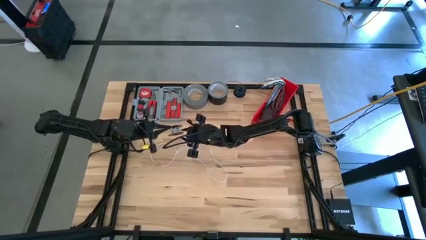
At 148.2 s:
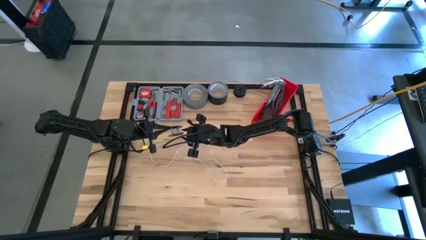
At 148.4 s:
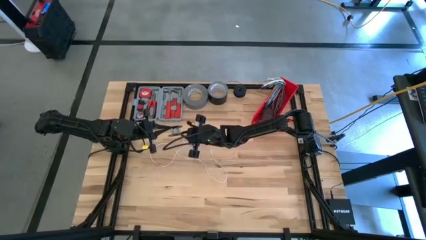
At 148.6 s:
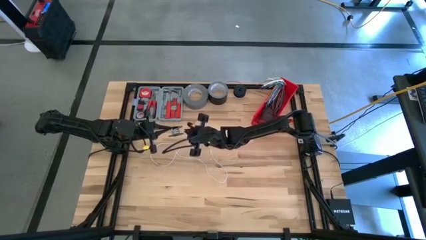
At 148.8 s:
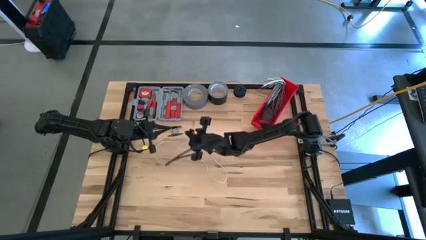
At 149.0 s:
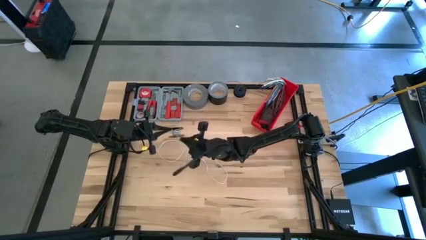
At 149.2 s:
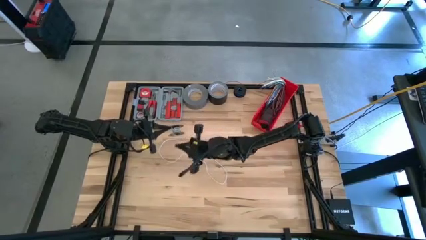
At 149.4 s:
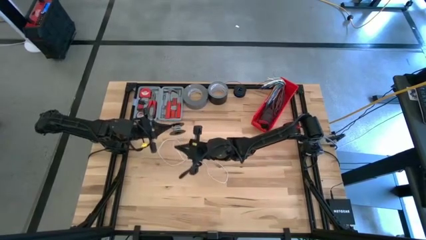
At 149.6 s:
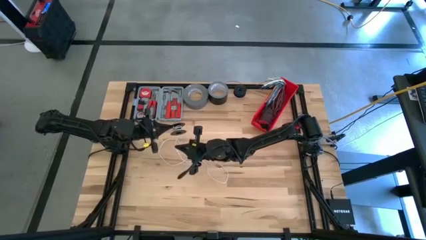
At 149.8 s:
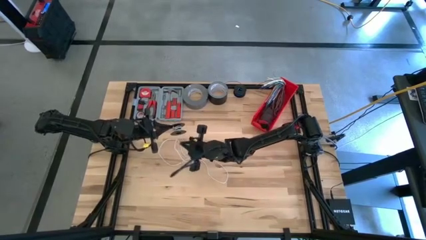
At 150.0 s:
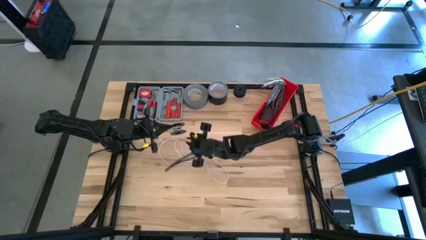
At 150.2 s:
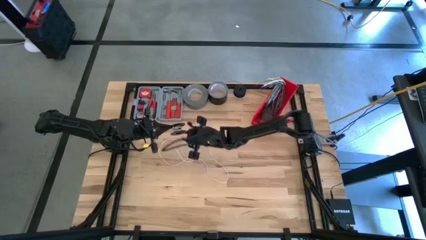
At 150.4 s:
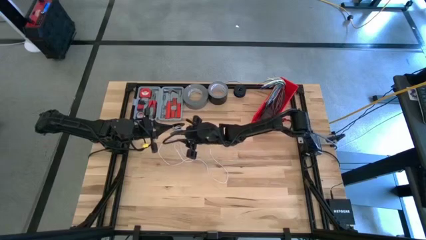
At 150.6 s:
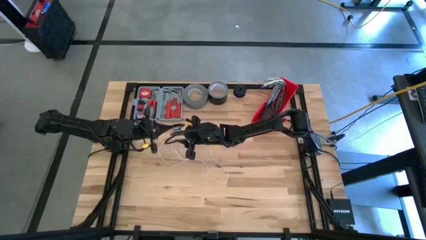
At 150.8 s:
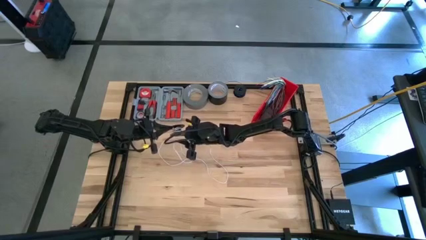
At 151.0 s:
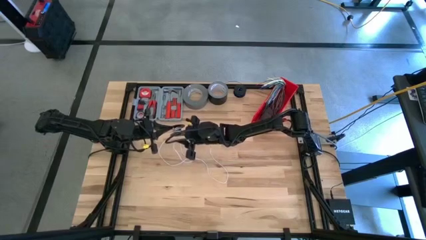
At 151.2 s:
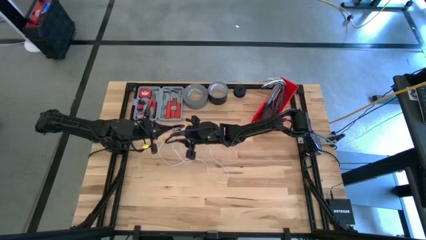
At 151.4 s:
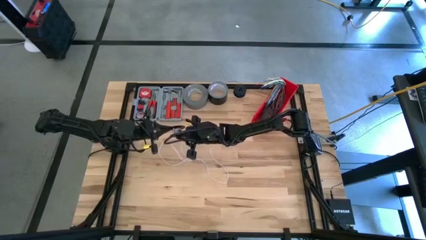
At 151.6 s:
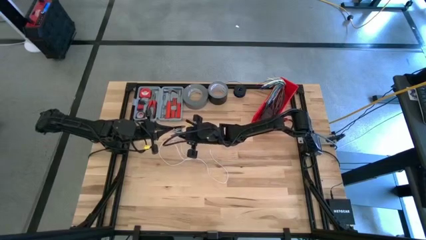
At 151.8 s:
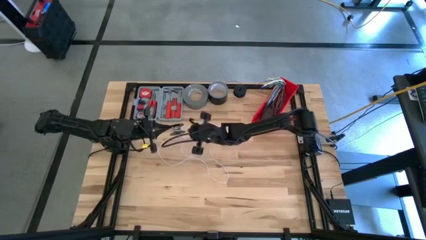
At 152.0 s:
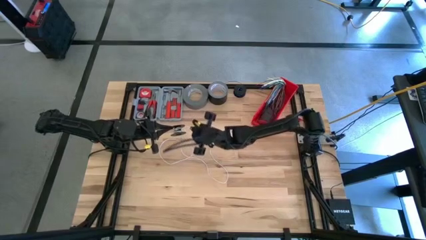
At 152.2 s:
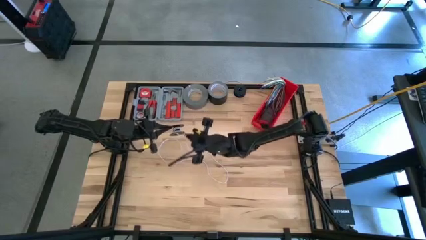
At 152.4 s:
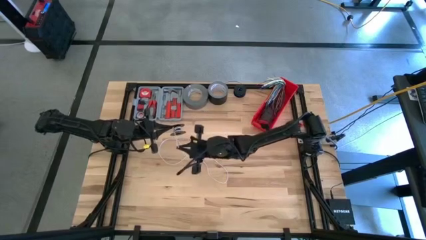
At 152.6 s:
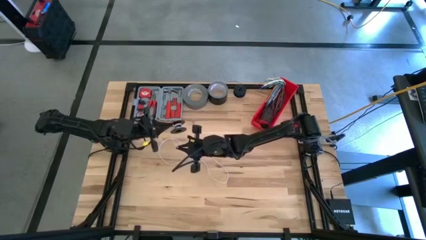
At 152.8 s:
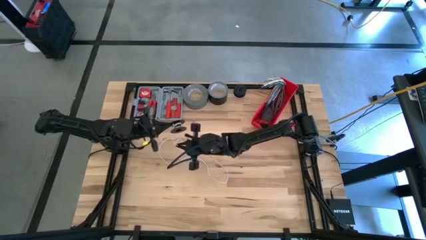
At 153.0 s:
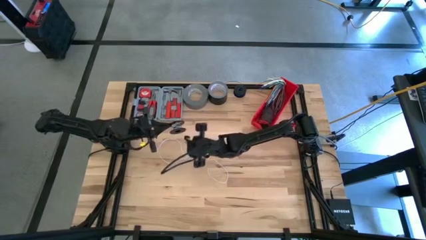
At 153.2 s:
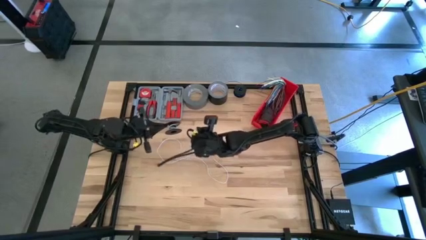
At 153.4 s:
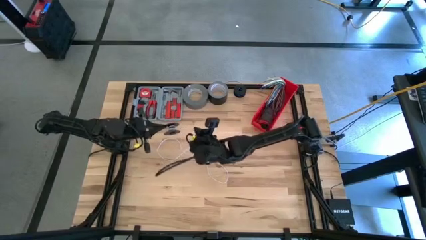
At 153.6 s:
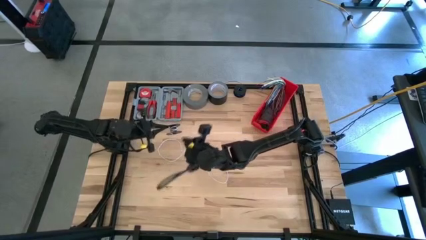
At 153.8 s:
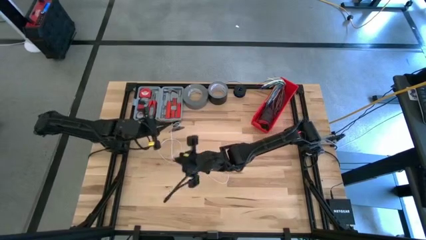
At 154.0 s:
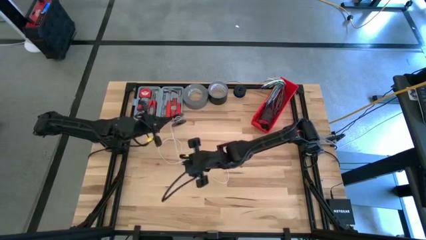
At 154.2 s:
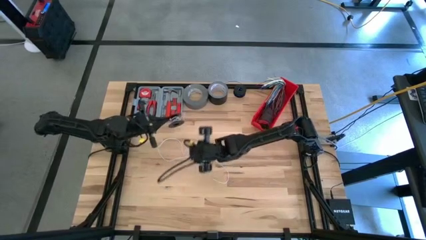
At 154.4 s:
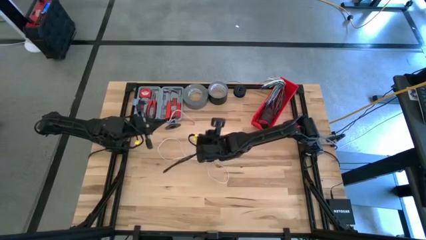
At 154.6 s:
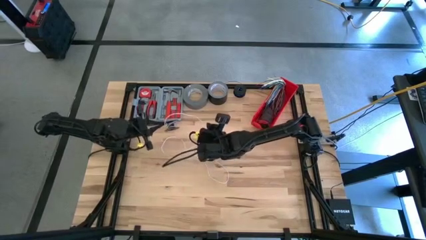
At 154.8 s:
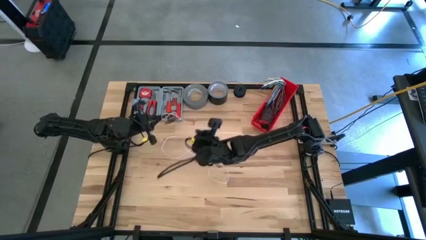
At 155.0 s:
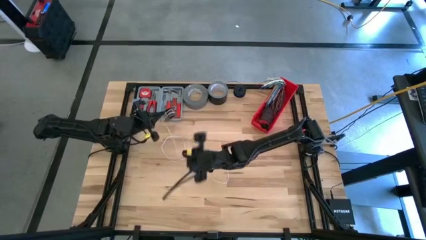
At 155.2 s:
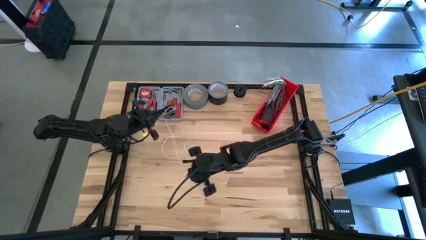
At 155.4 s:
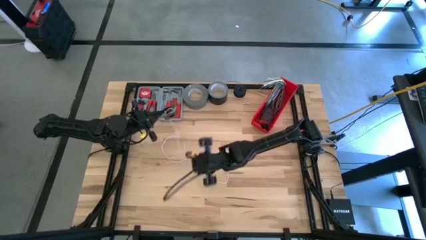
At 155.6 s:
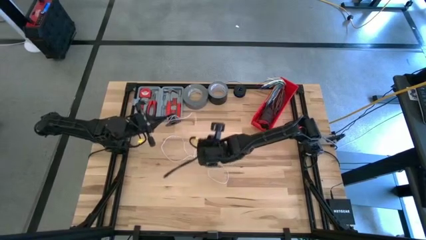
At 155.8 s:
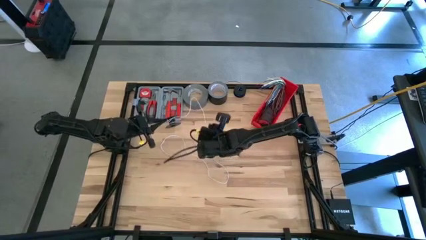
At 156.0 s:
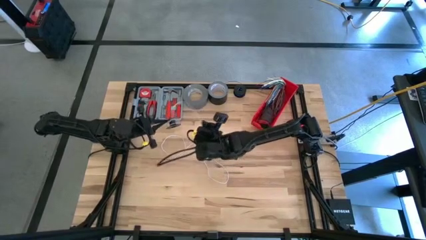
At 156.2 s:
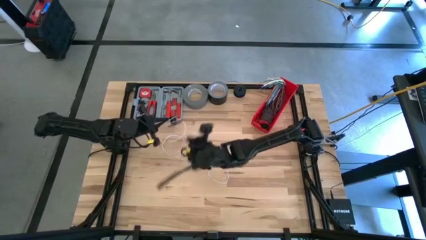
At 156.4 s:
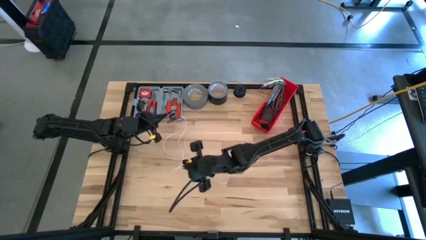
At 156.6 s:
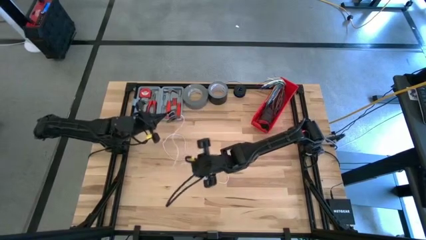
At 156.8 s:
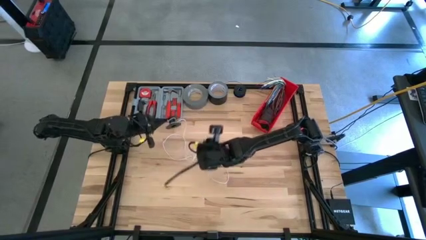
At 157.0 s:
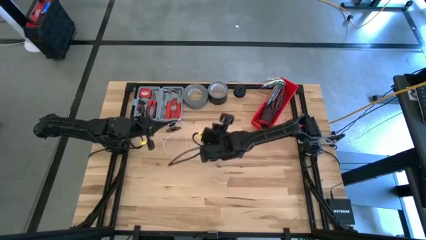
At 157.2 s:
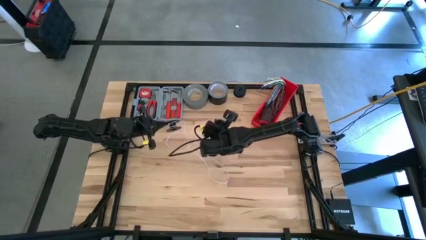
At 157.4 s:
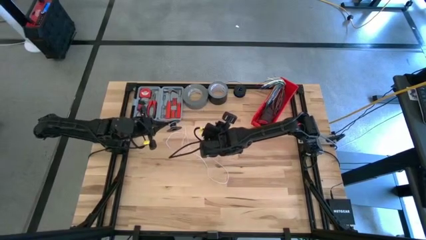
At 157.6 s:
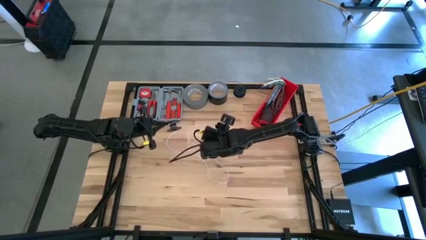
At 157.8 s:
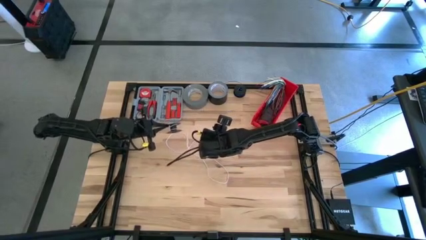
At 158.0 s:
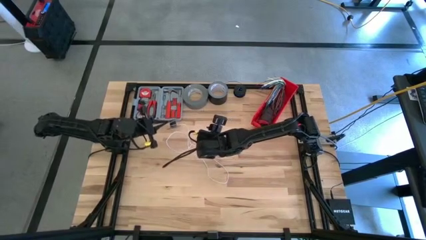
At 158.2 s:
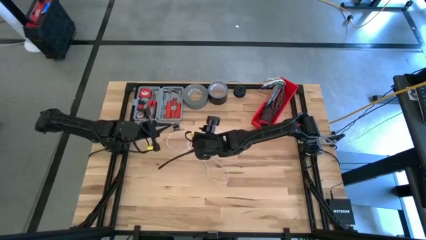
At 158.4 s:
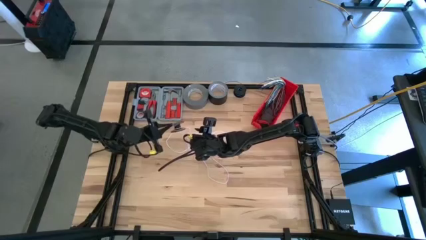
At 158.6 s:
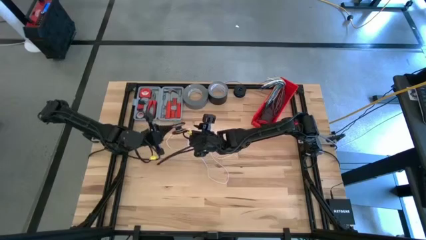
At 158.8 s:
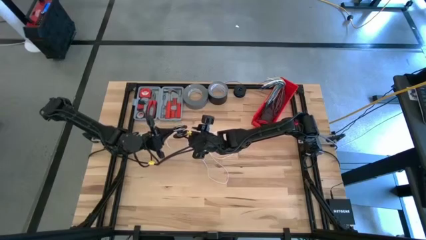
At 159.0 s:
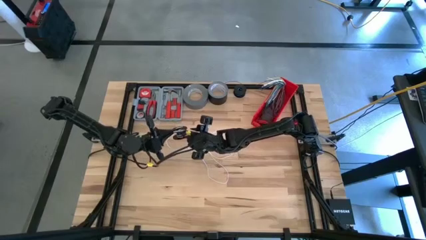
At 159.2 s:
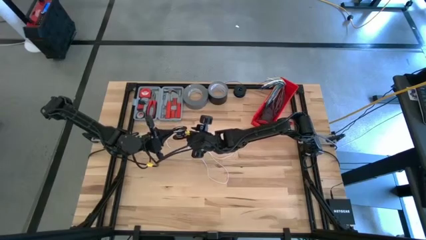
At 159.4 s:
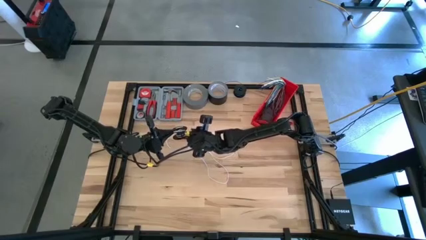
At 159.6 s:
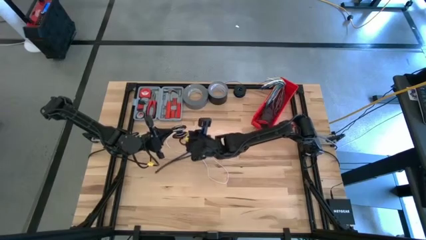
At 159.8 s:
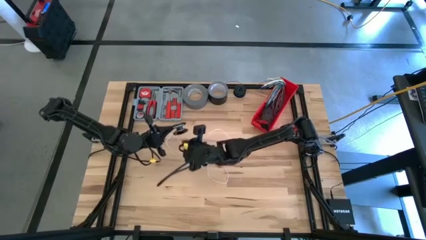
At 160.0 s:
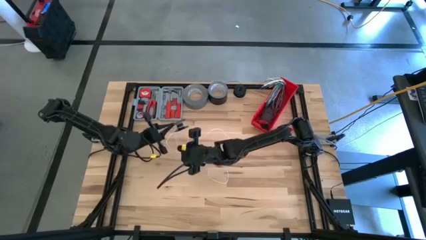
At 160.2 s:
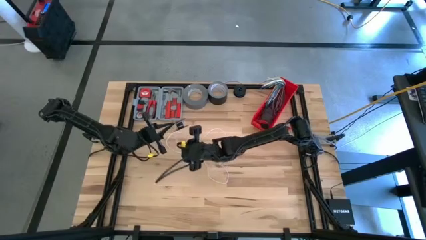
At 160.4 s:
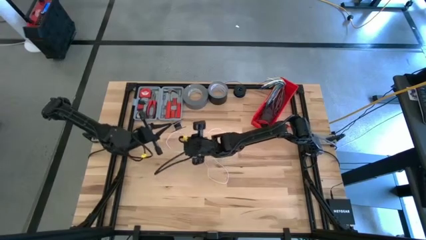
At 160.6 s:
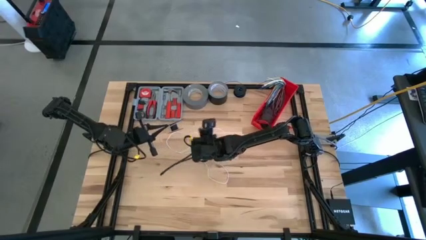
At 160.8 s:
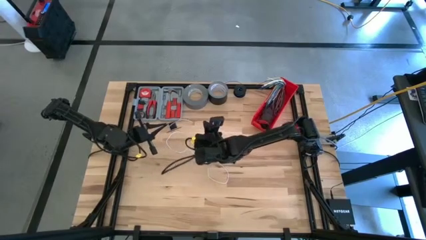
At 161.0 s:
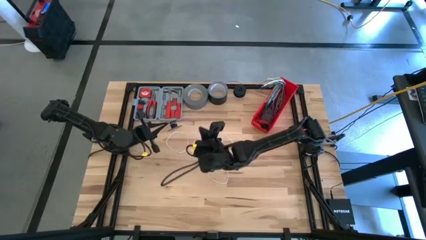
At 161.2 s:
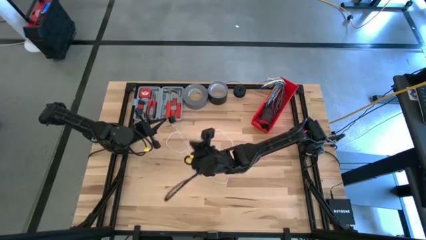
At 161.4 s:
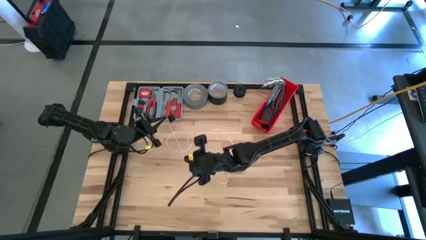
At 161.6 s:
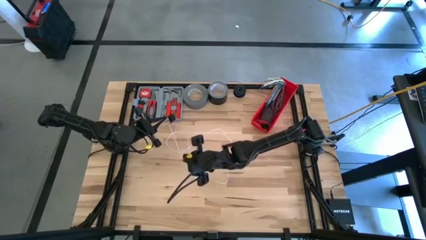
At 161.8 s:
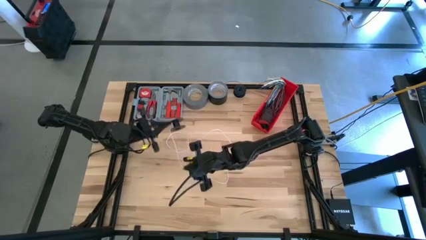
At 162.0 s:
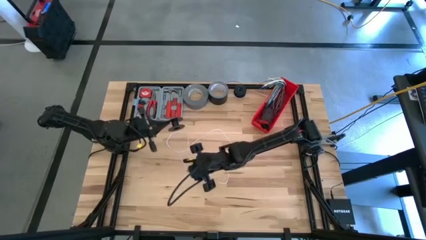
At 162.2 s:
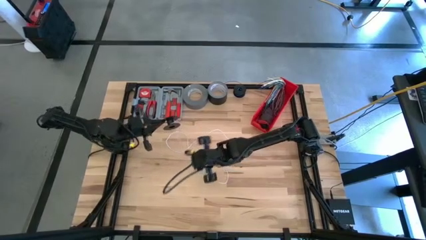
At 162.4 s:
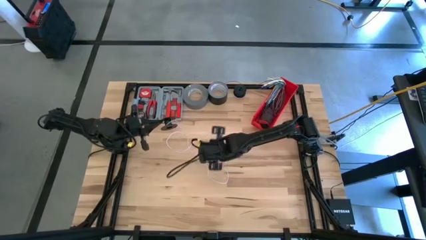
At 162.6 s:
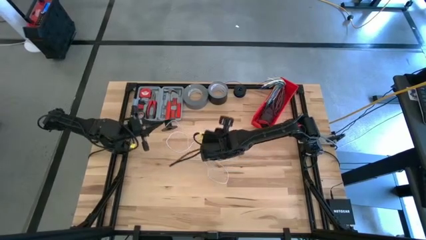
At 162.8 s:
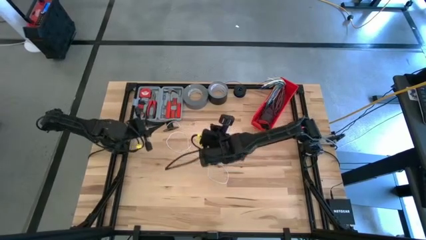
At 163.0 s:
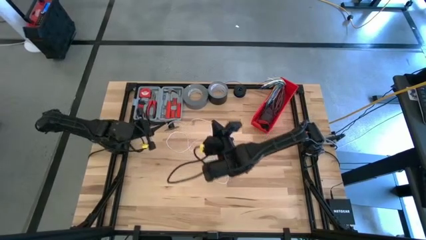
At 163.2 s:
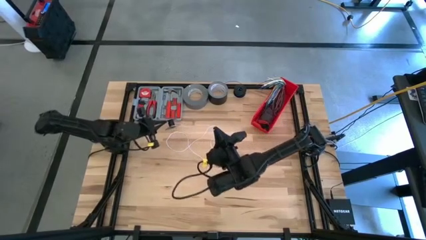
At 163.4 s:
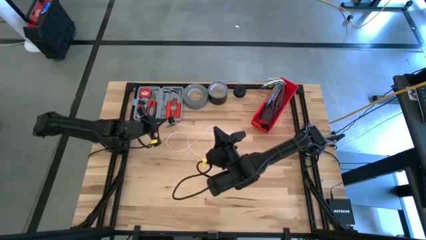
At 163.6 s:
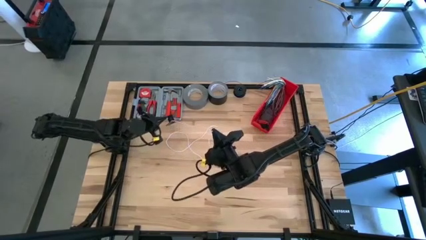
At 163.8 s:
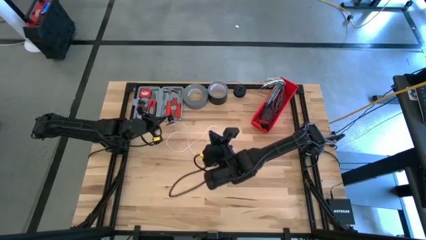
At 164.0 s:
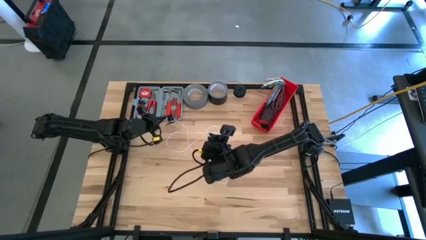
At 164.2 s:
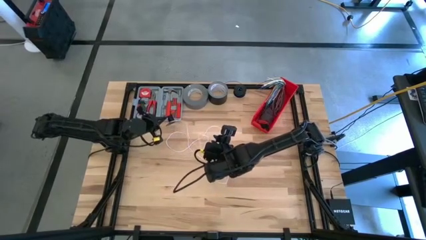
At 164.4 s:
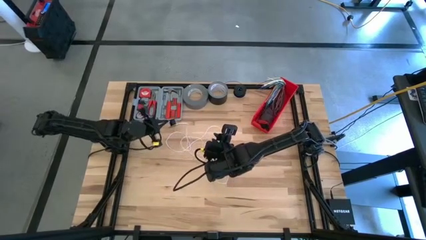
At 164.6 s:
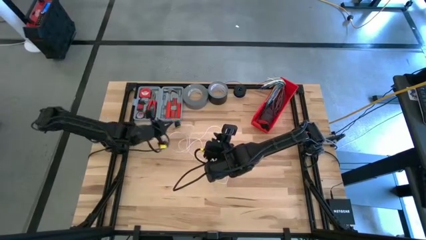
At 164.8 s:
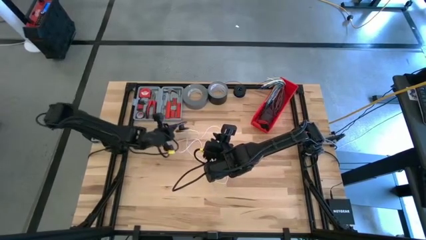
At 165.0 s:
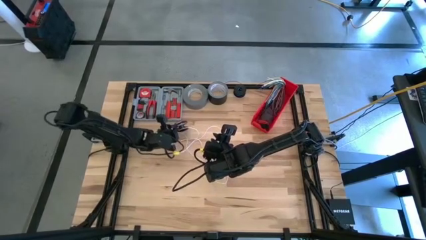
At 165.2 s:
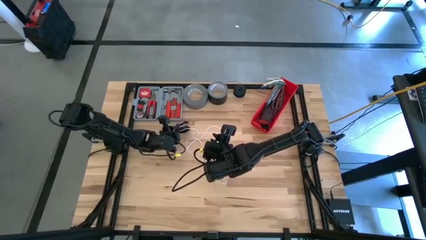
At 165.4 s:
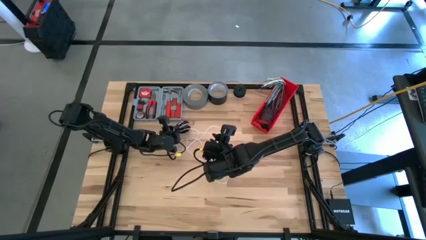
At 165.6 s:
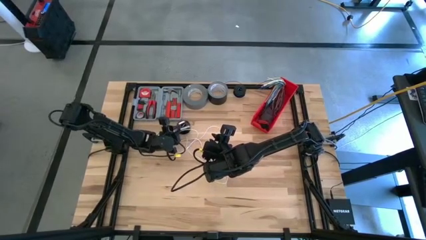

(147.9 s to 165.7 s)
Task: Coil cords
Uncoil the white wire from the black spool
